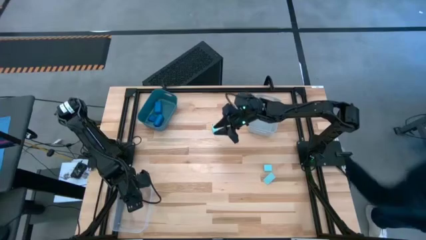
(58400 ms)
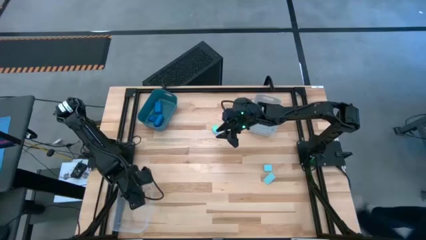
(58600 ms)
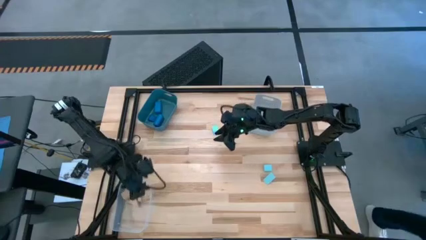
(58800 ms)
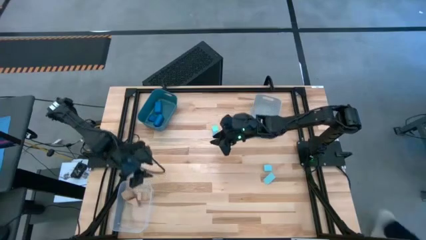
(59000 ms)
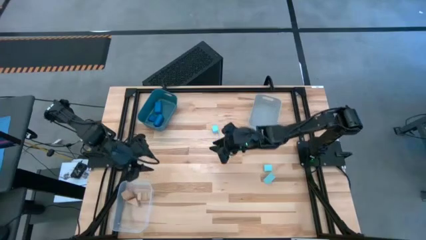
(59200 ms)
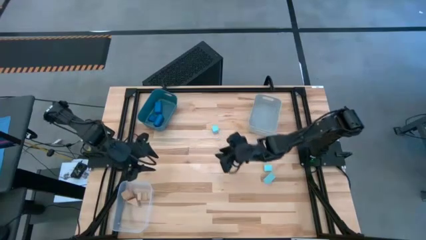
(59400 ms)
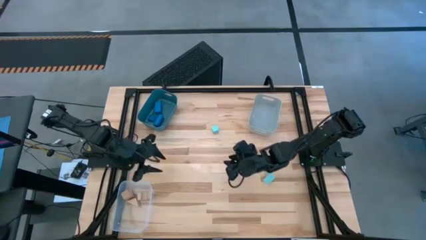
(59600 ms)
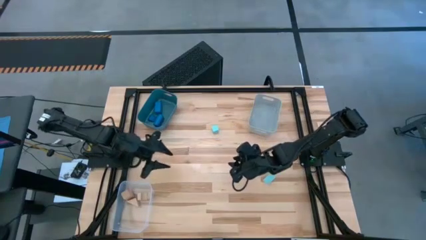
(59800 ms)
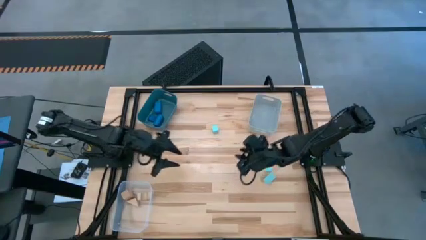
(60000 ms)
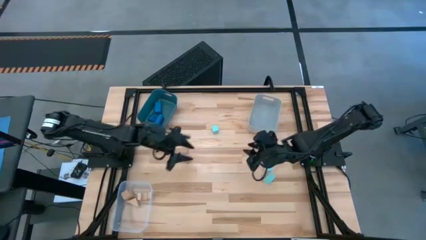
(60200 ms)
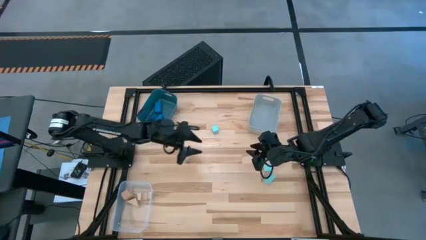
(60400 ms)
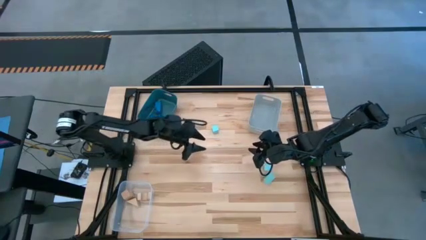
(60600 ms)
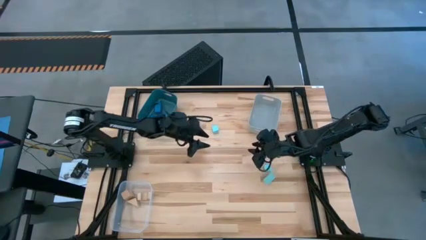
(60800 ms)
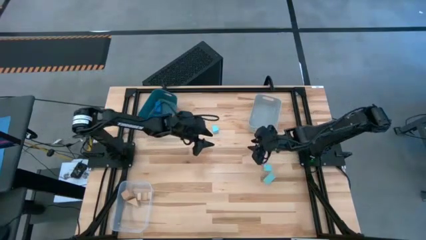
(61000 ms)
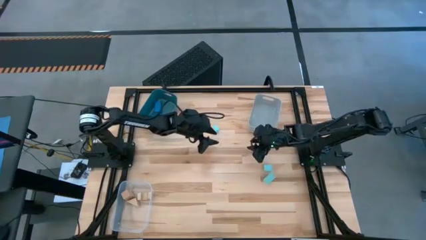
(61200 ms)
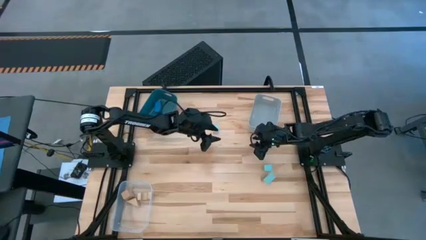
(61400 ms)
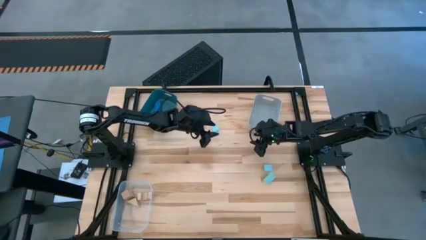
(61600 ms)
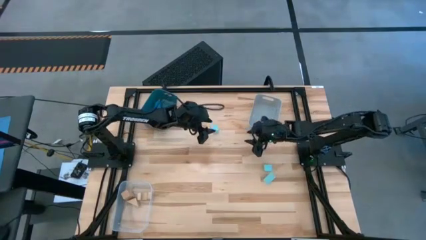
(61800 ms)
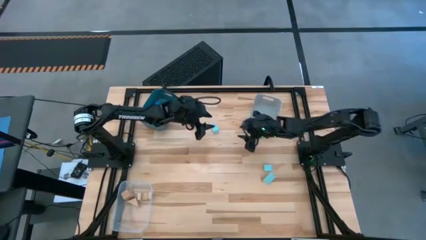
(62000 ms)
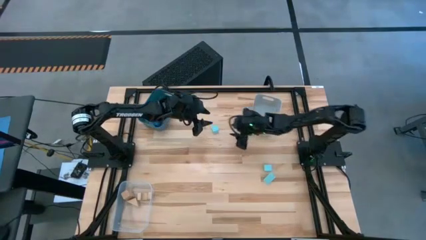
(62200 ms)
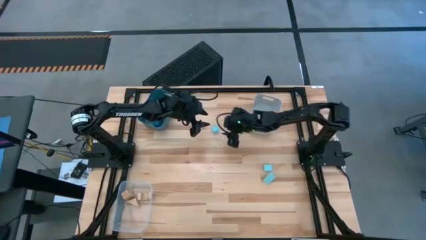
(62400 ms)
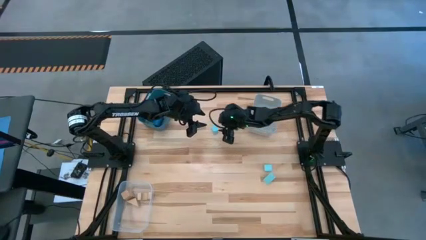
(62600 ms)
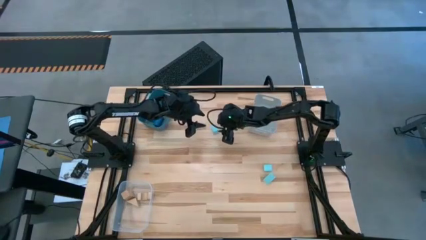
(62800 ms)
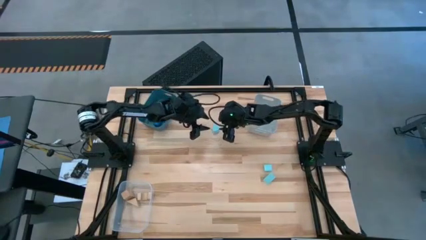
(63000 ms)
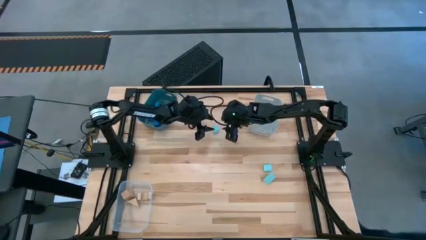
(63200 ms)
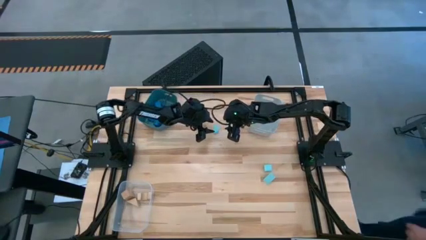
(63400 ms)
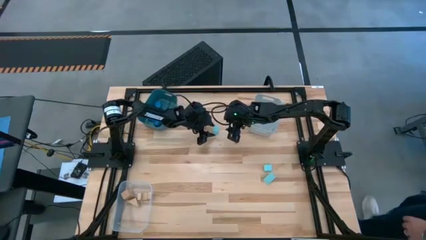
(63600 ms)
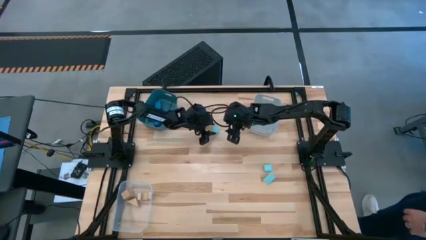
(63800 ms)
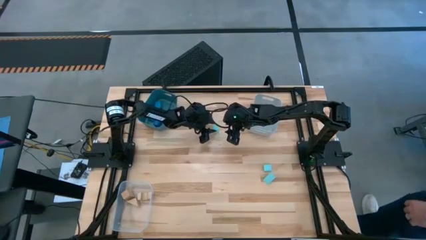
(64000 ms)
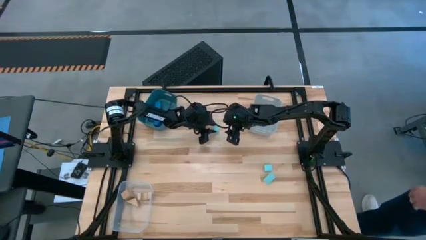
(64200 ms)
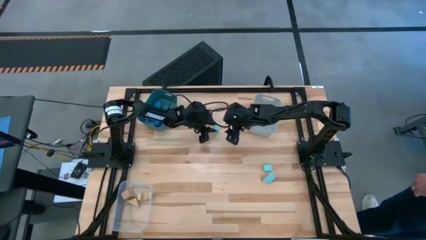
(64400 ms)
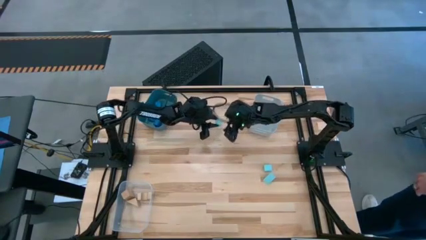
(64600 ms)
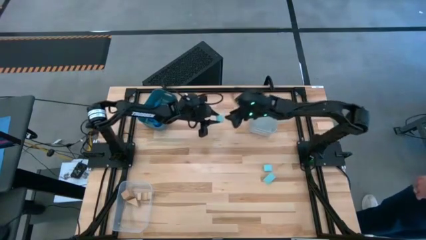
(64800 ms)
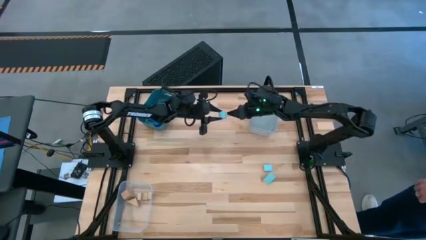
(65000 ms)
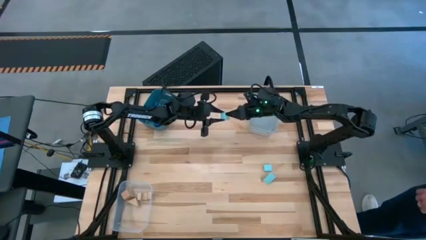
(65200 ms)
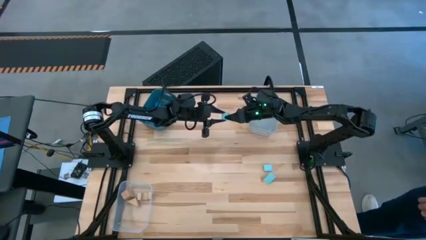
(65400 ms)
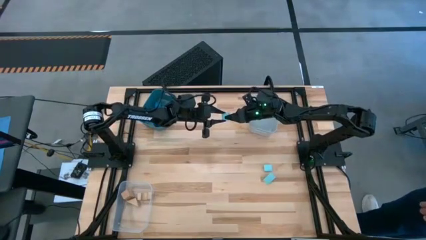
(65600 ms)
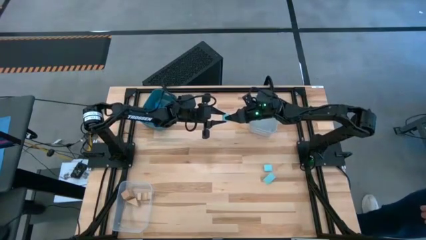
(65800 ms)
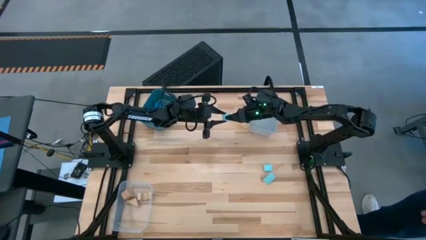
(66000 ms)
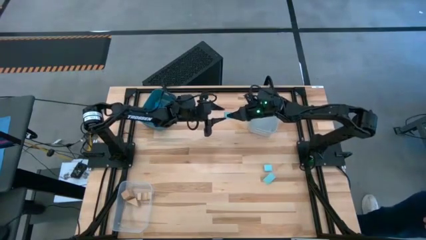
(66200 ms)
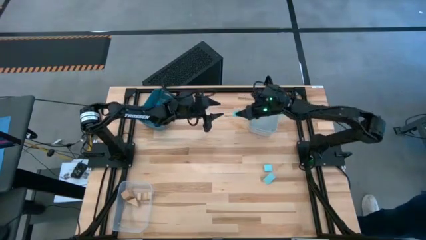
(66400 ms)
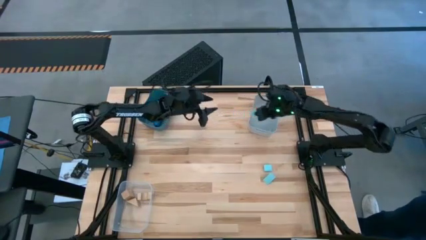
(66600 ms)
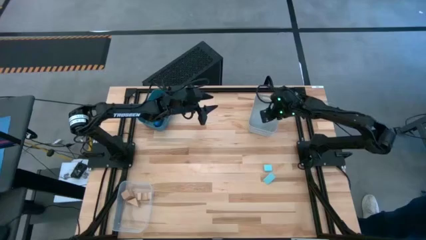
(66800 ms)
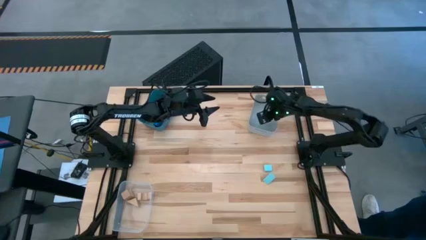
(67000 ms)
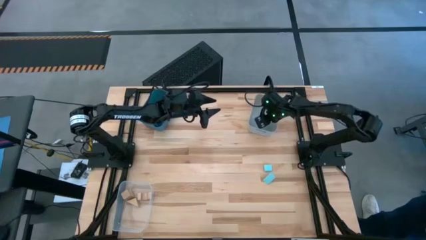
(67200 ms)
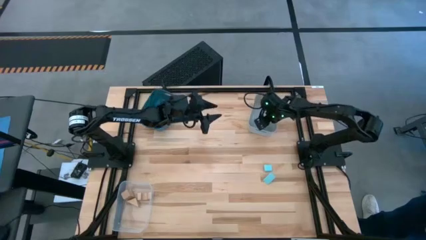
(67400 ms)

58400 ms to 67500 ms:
Task: Sort & place blocks by color
Put the top left light blue block into the gray bin

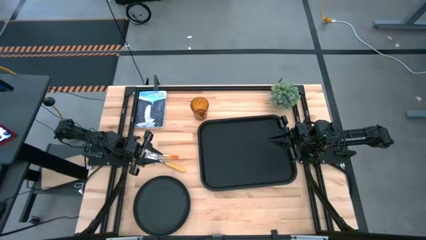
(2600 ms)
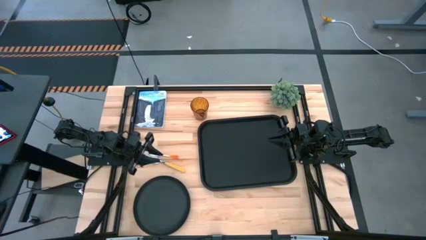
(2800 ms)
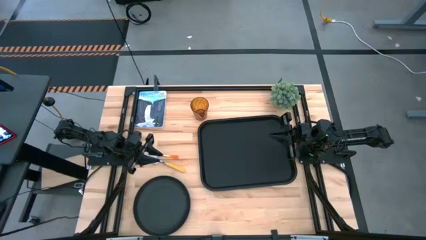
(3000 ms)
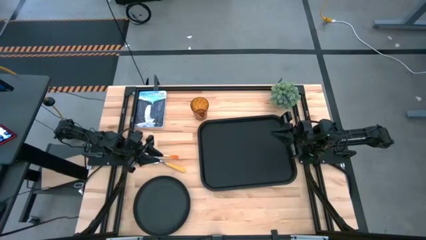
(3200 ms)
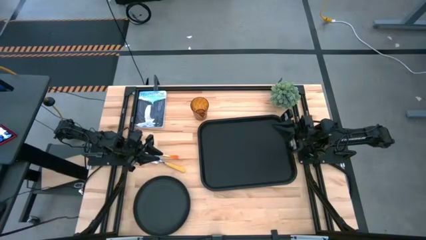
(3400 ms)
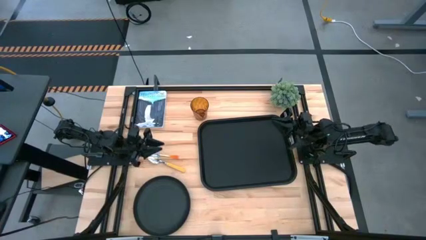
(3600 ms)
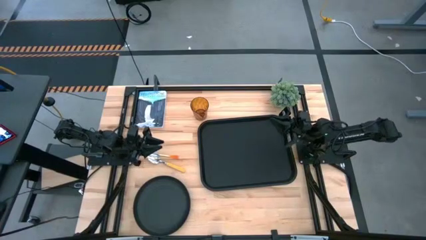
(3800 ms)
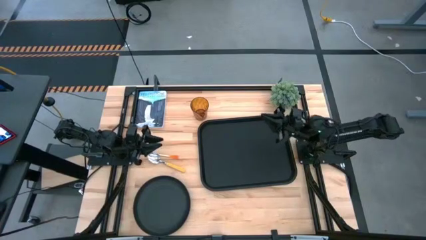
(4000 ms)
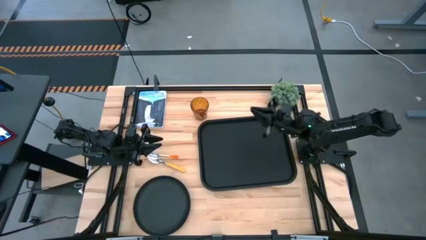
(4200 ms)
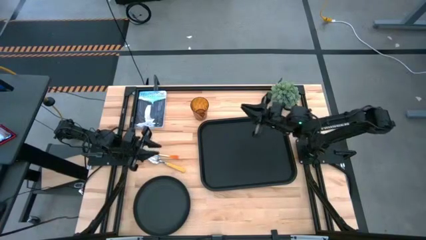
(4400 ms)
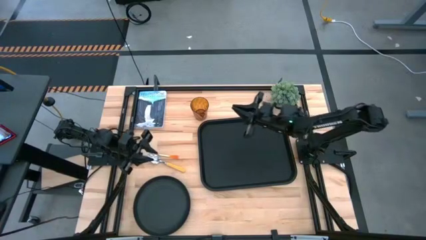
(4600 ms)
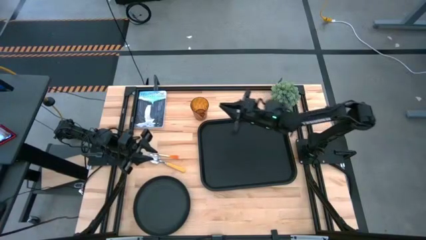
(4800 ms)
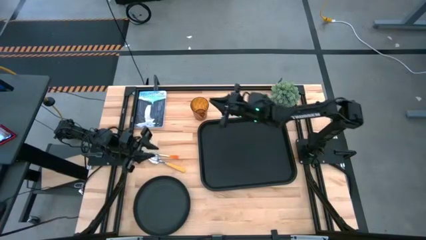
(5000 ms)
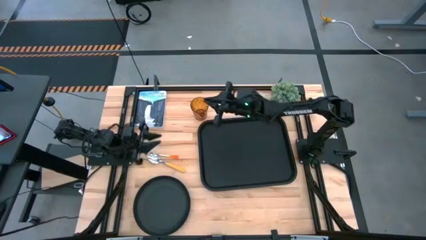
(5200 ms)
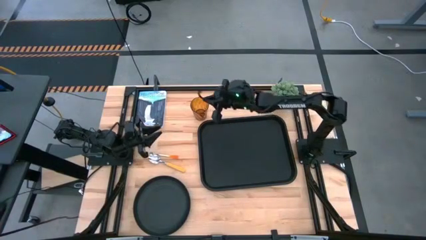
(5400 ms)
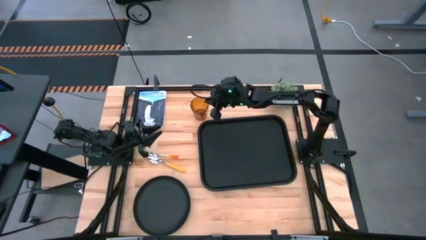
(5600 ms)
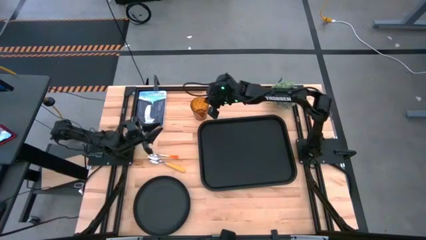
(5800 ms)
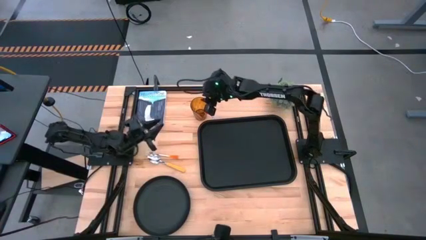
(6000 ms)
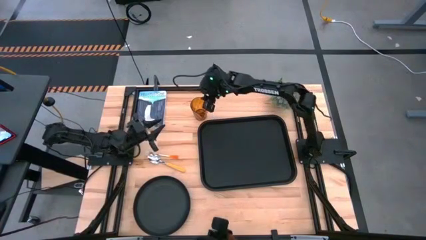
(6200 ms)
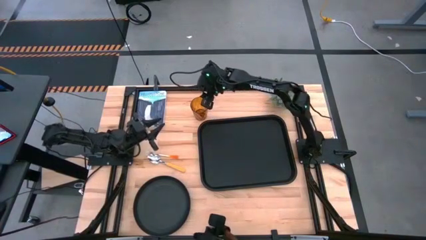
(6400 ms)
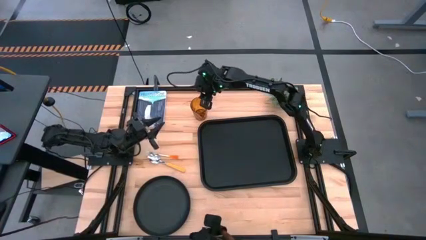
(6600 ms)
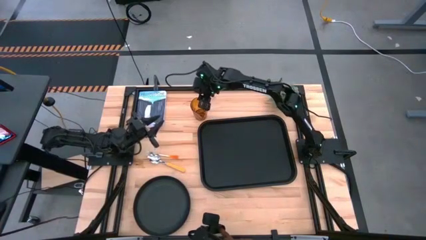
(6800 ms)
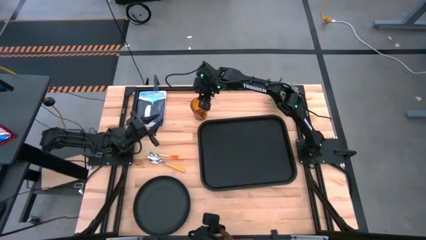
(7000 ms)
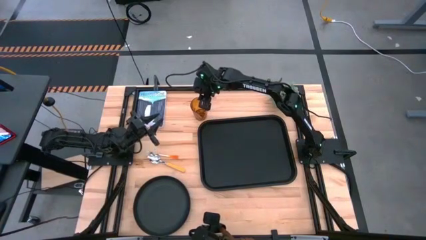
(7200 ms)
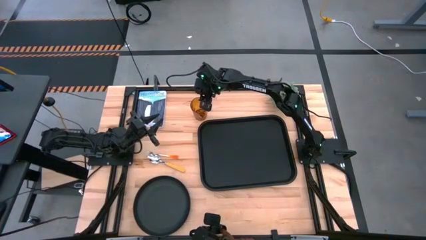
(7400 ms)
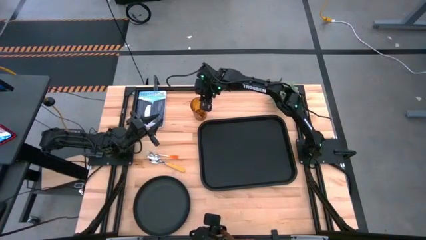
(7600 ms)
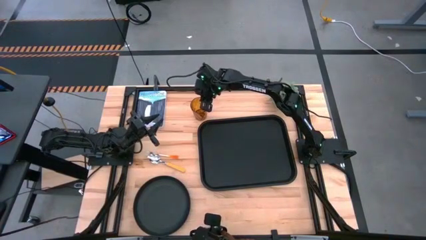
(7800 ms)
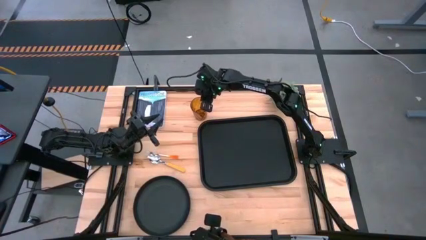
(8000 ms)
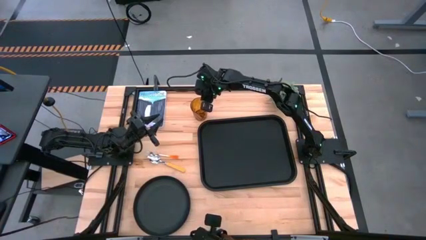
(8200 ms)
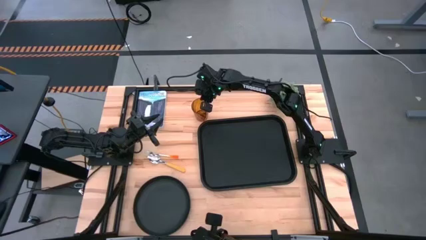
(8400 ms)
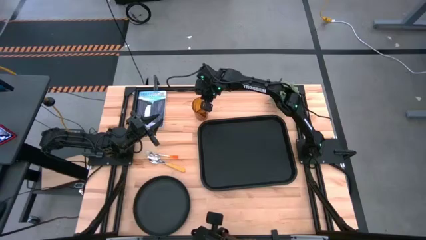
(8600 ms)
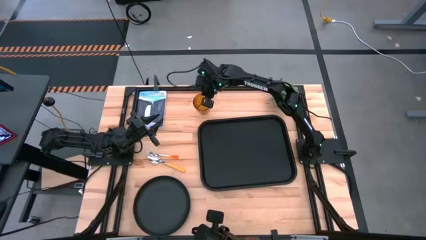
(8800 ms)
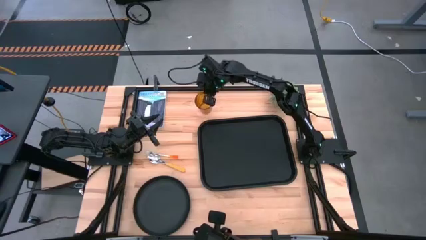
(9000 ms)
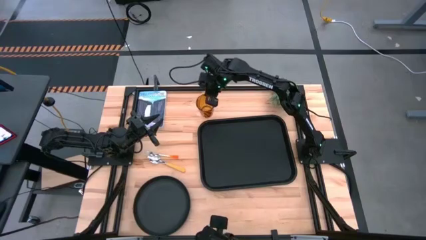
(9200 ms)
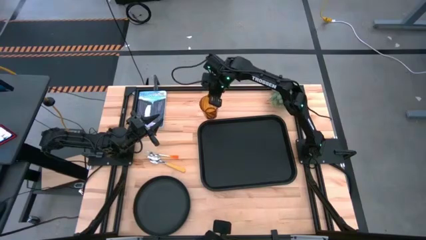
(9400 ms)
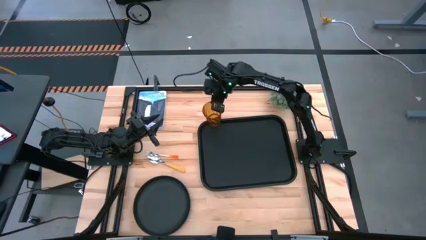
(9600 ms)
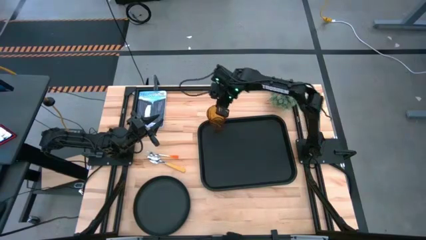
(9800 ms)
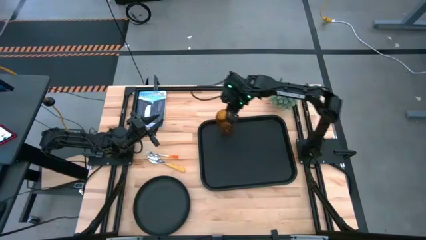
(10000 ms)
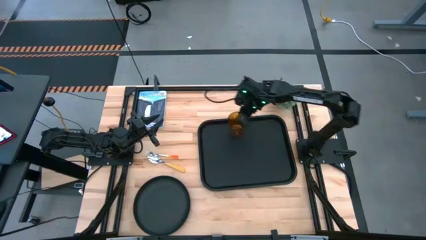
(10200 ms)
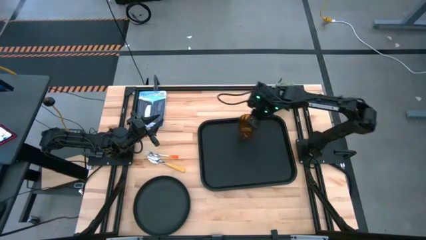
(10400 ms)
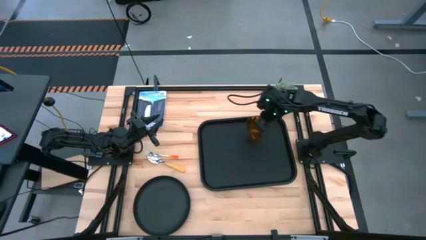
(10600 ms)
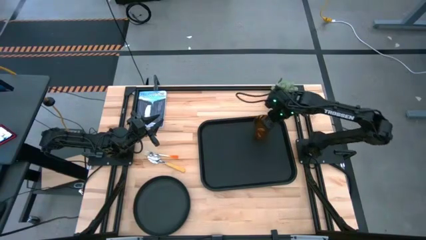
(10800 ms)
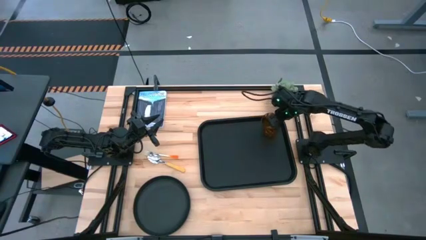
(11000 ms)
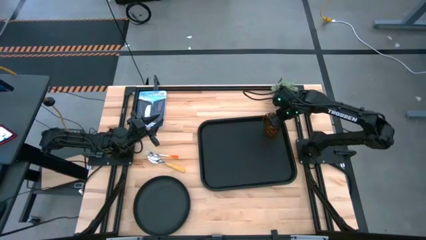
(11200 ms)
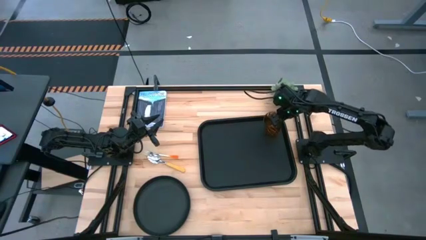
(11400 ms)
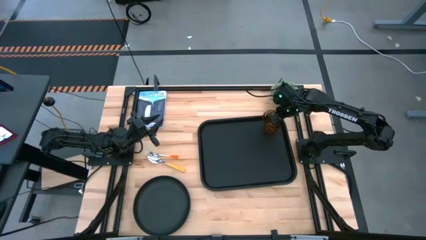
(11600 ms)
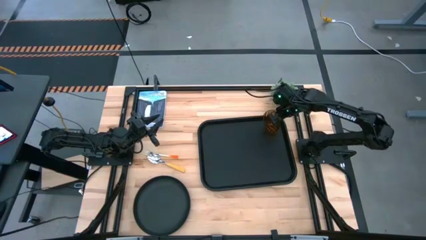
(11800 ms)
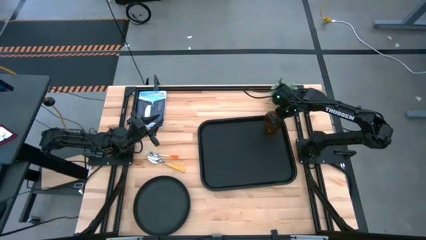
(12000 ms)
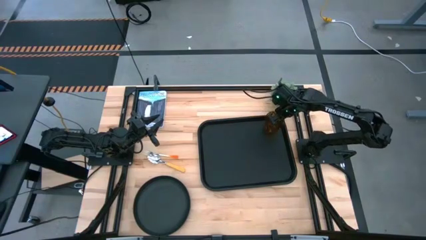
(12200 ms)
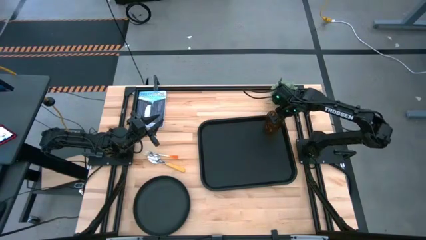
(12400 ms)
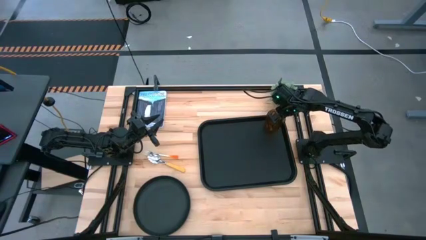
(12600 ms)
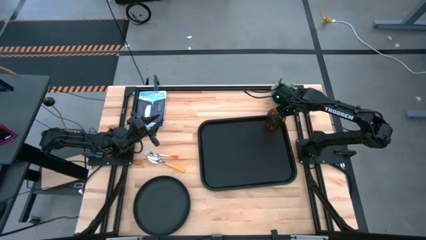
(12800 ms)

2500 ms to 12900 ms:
Task: Pick and place plate/cup/fork/spoon on tray
Put the yellow cup on the top right of the black tray
